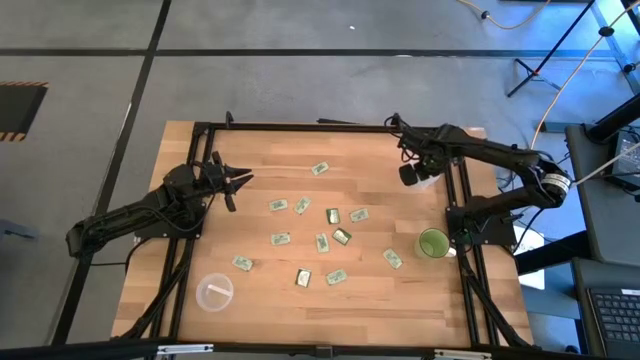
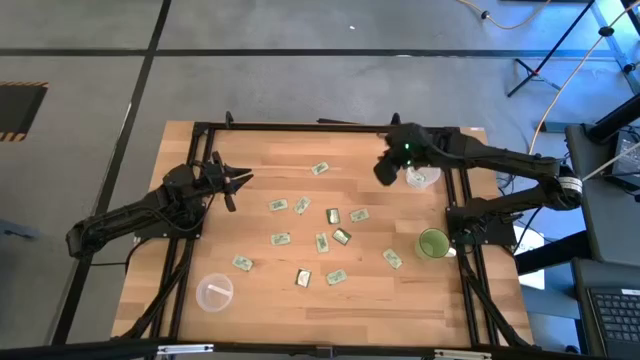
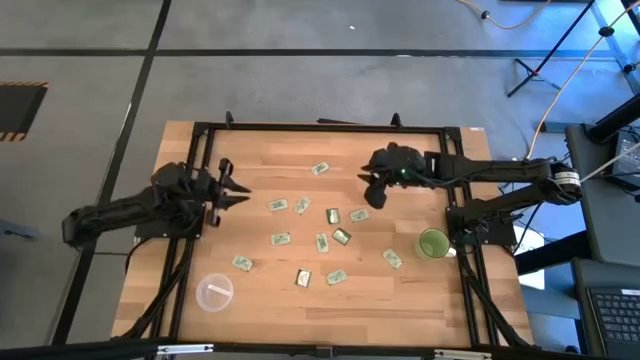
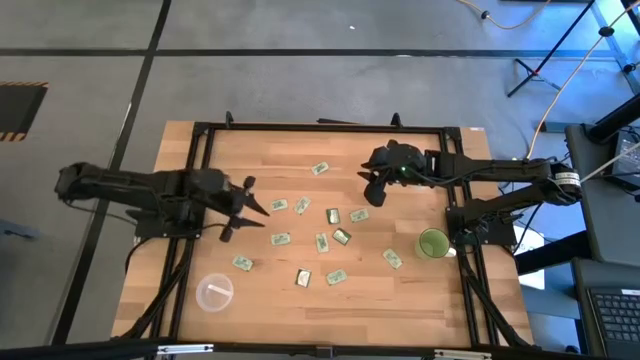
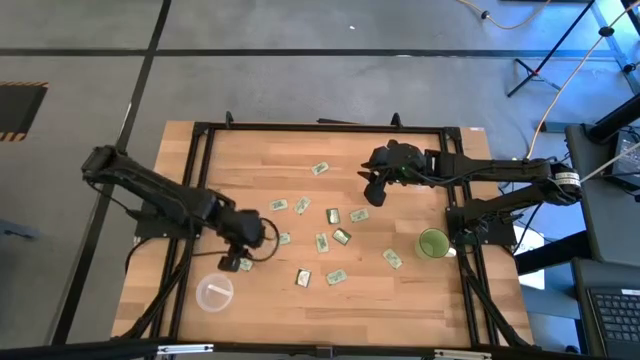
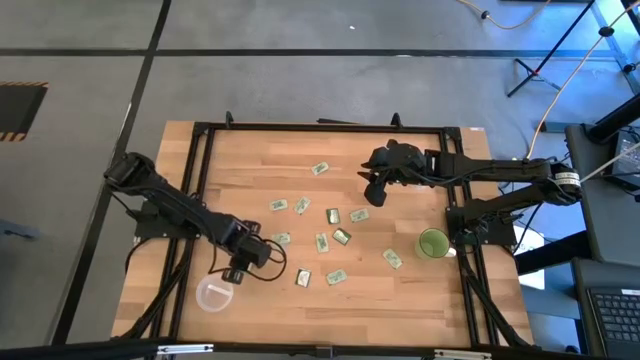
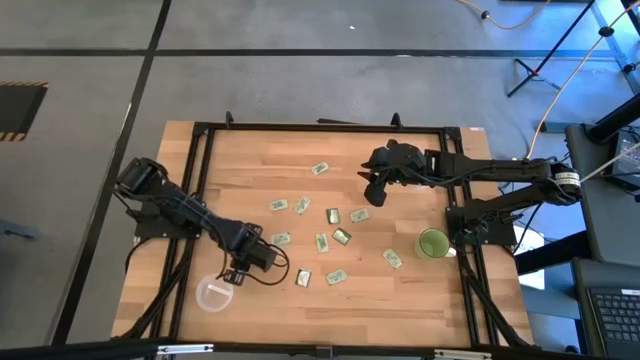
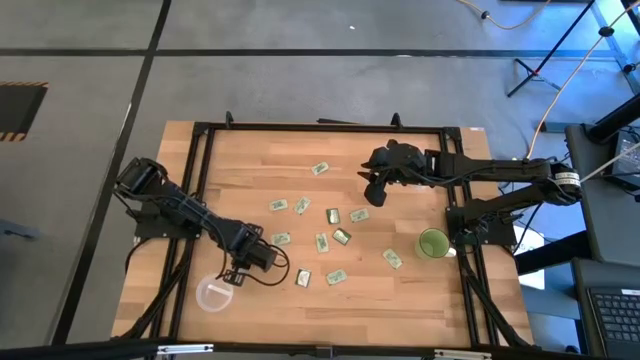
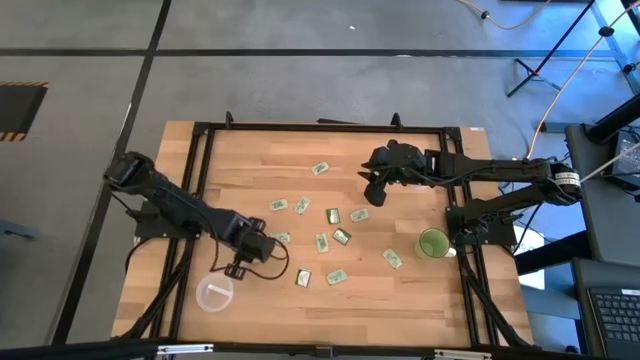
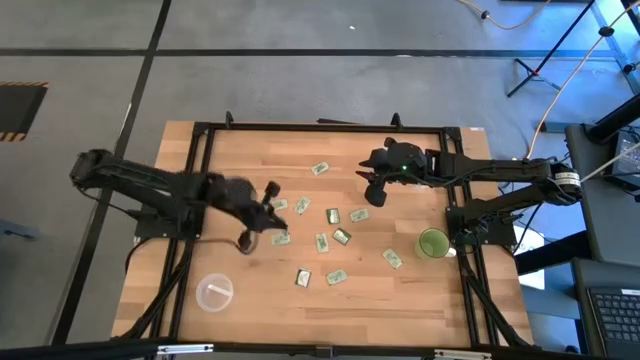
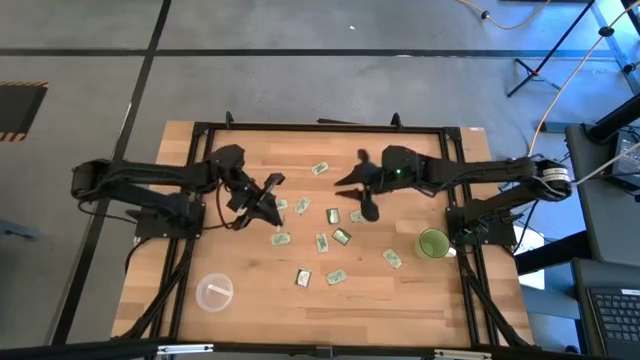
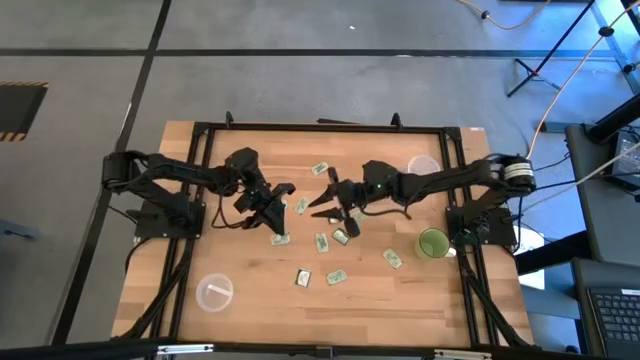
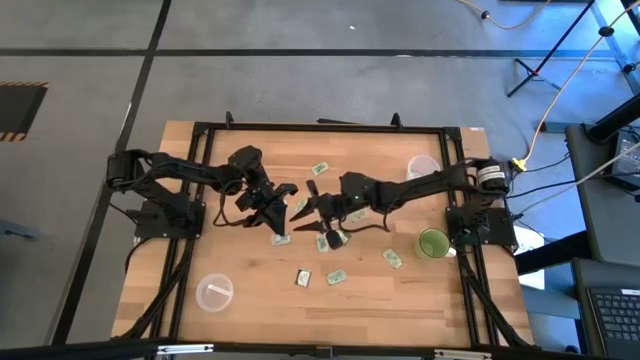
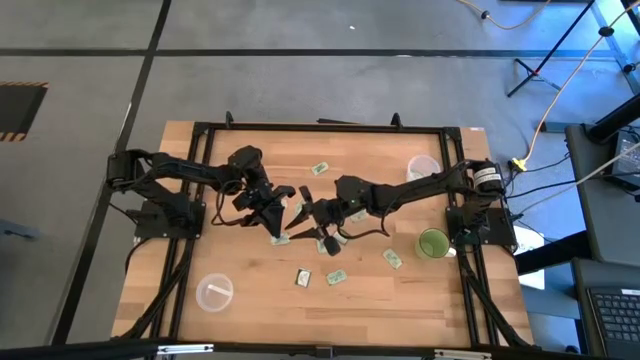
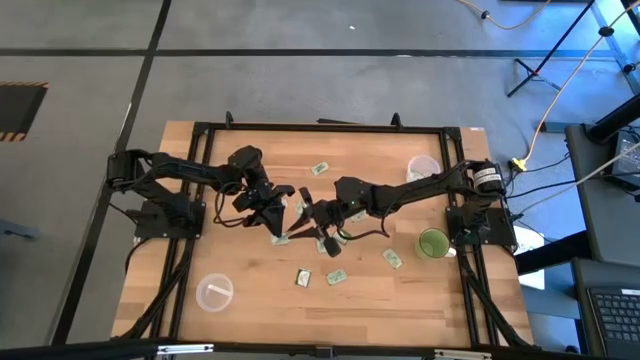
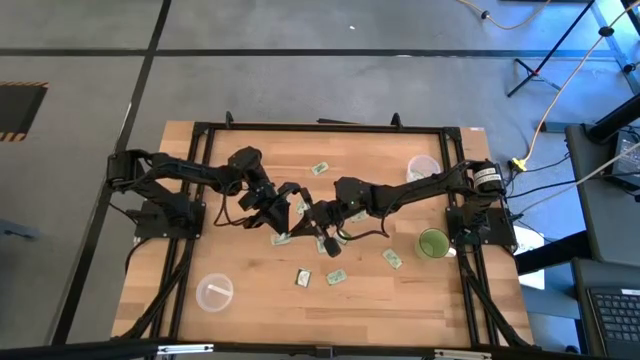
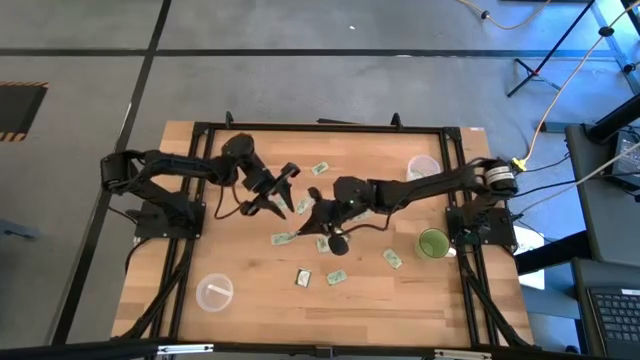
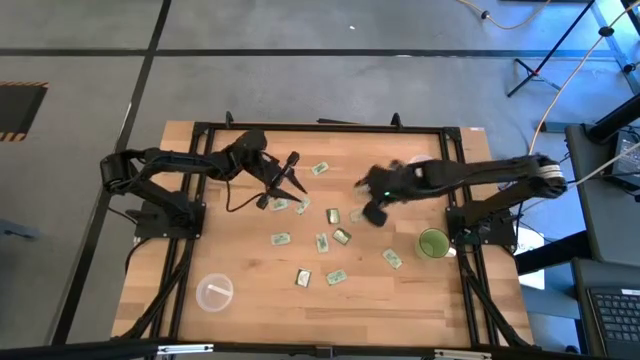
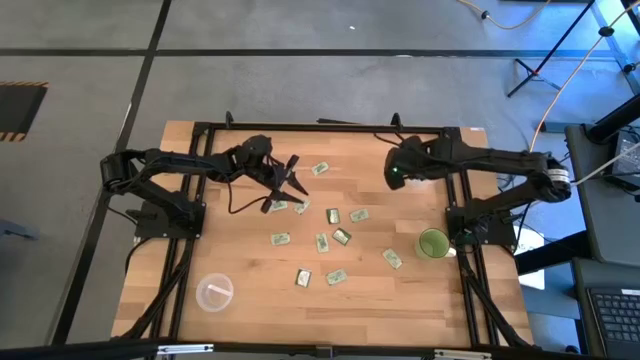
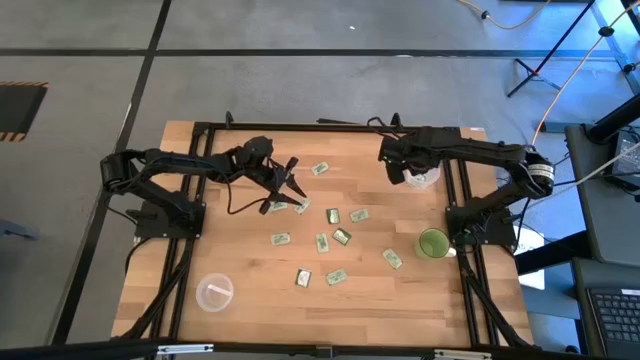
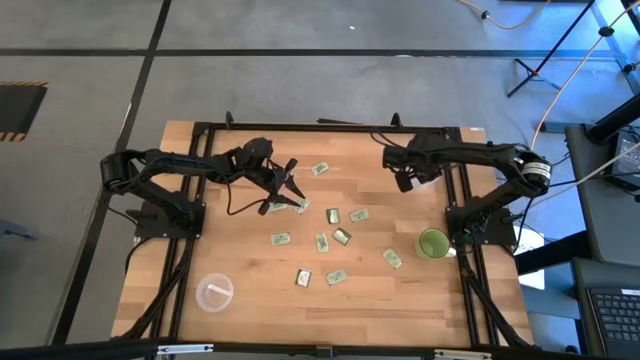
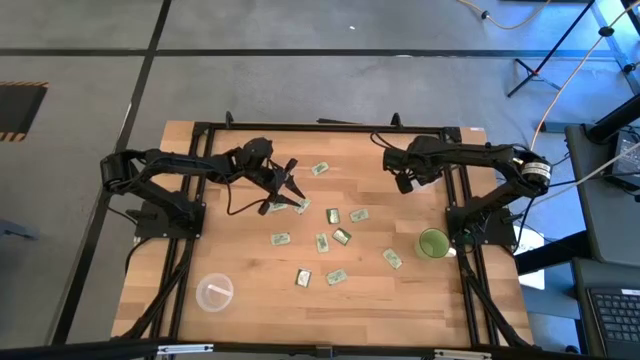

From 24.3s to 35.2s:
Task: Pick and place items into bin
Put the white stevia packet into the top white bin

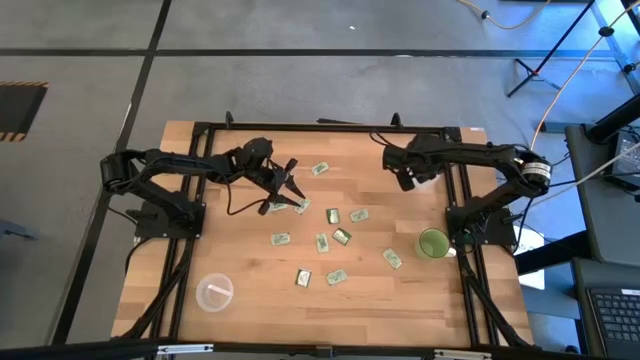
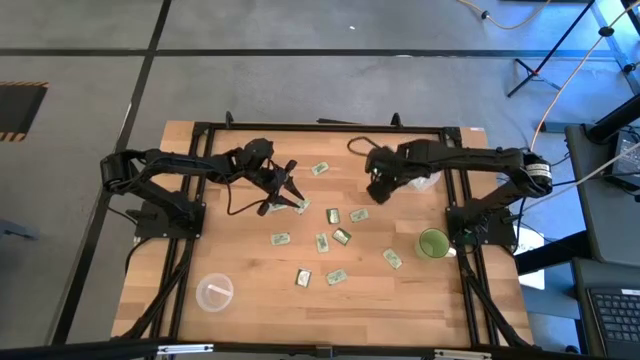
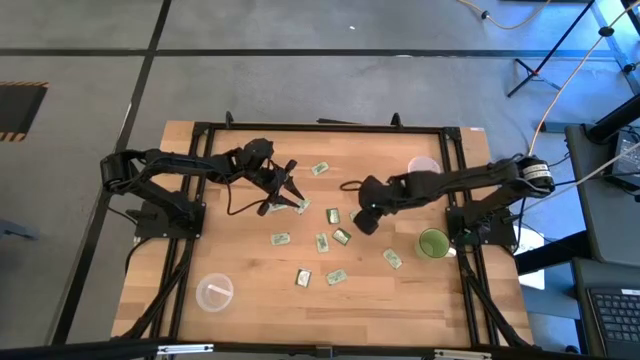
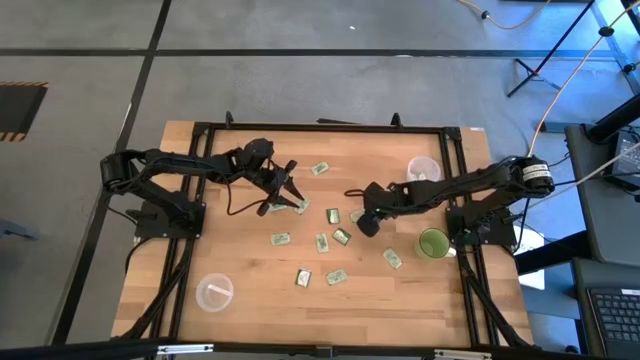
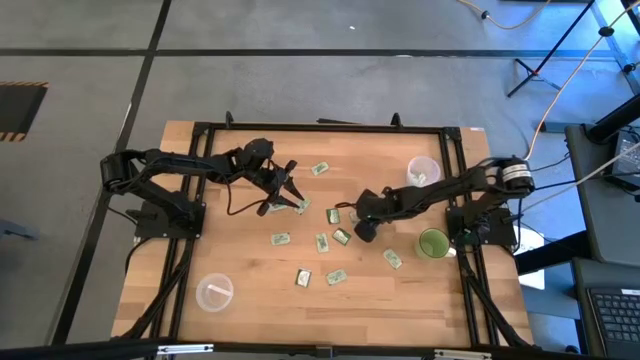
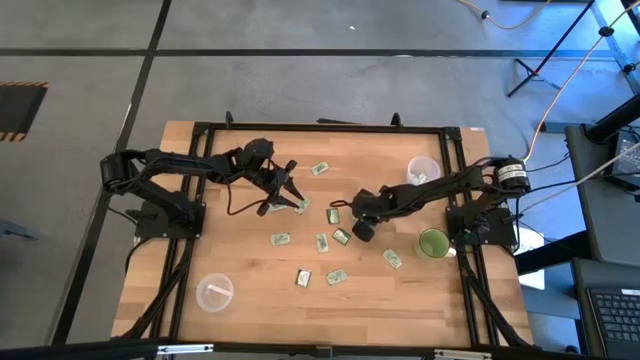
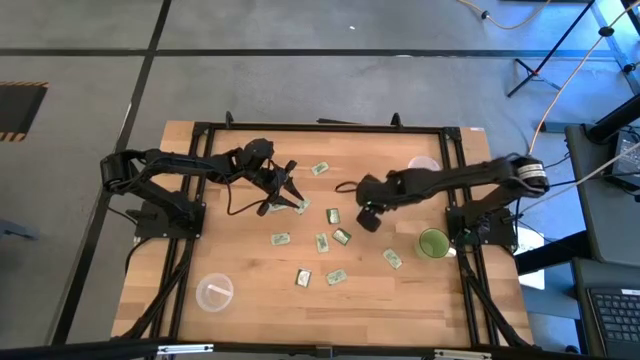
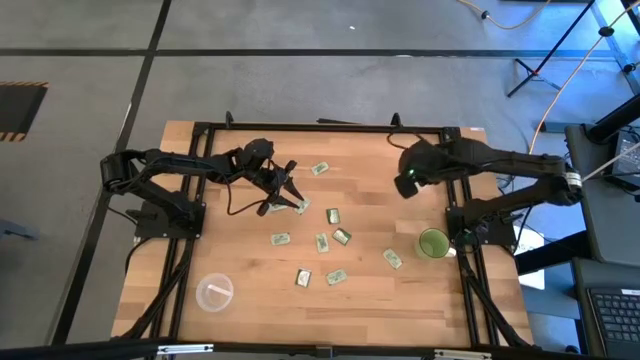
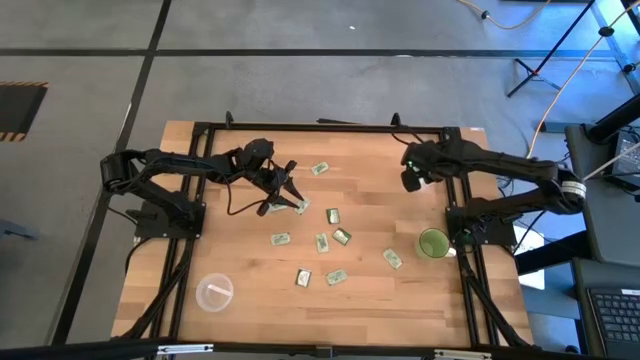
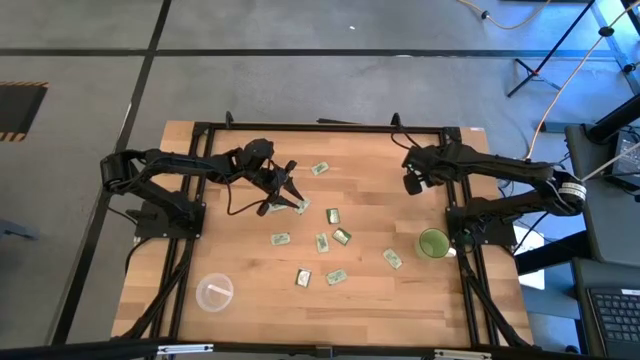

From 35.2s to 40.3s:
Put the white stevia packet into the top white bin

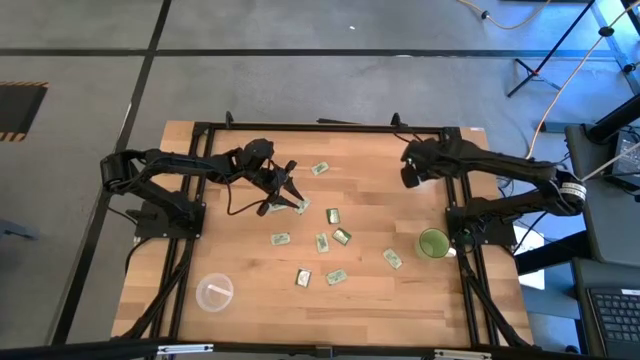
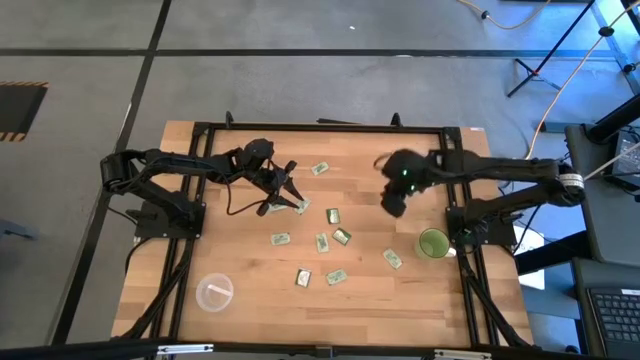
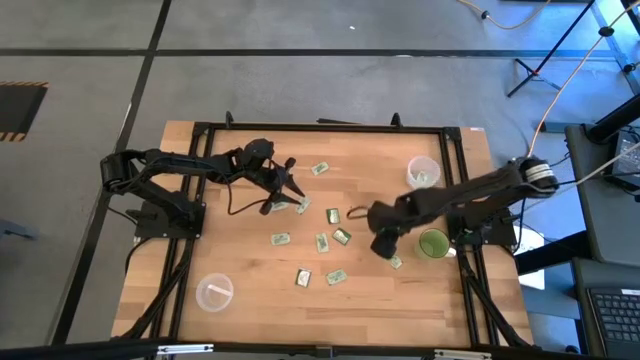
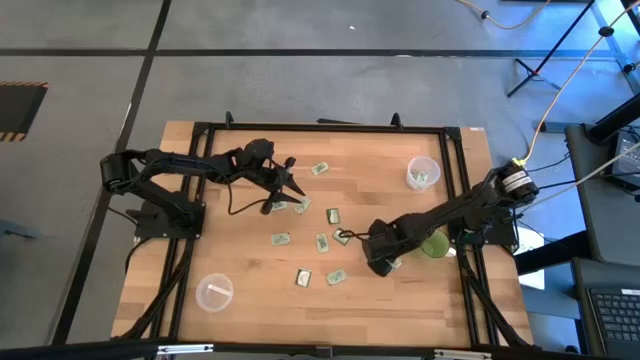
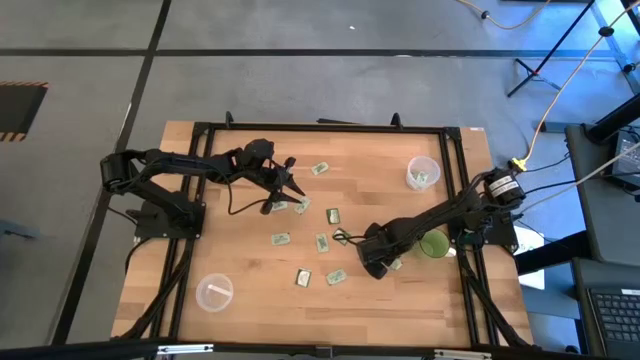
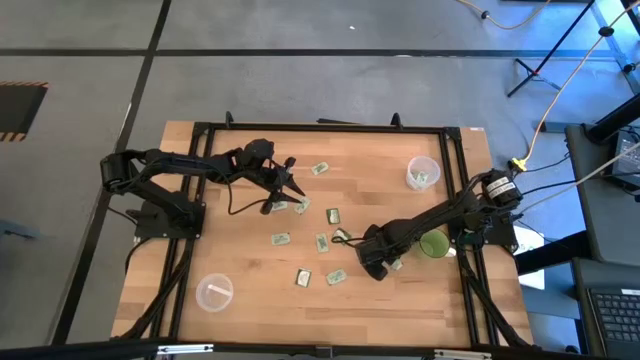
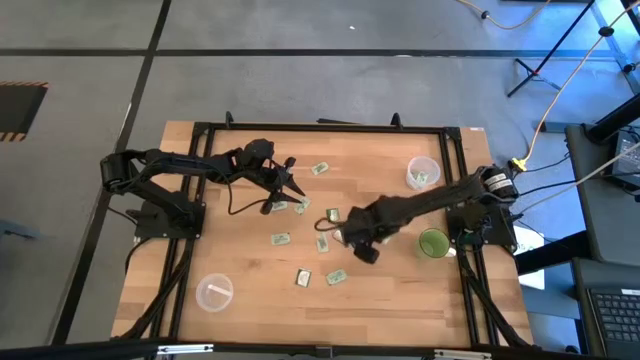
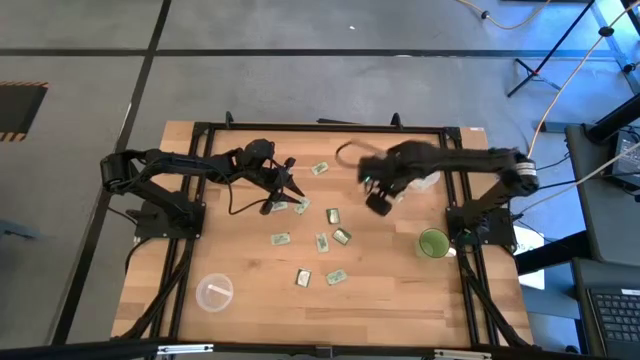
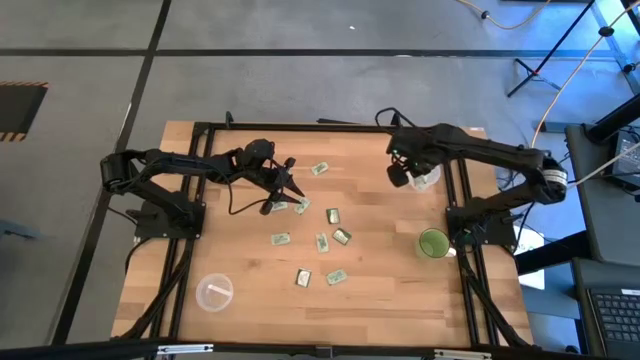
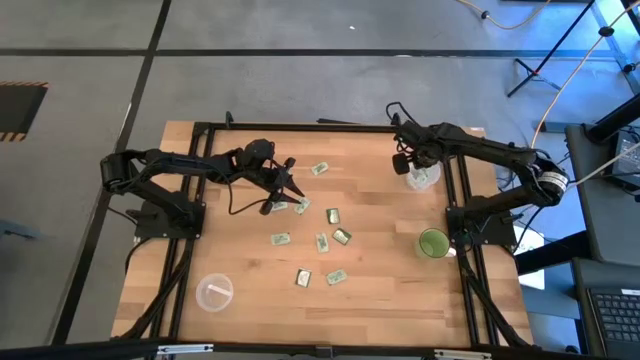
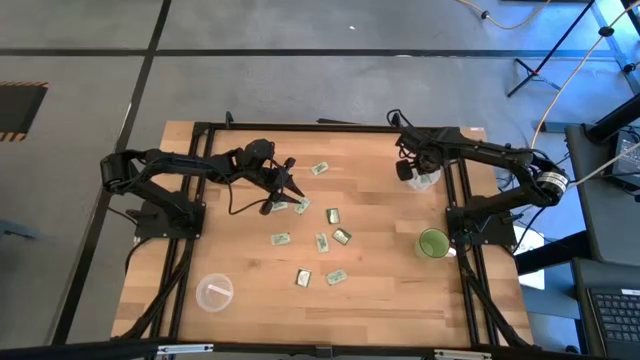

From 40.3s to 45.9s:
Put the white stevia packet into the top white bin
